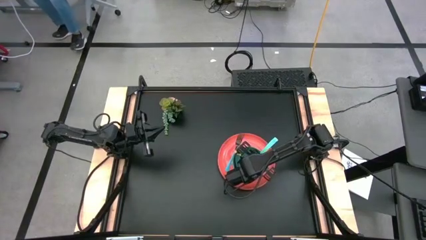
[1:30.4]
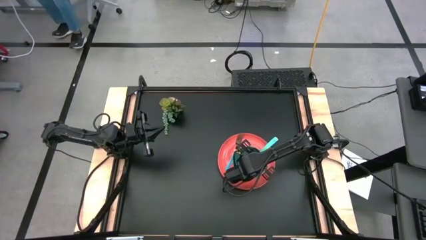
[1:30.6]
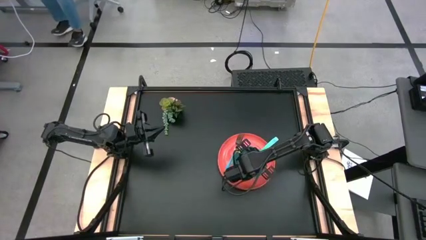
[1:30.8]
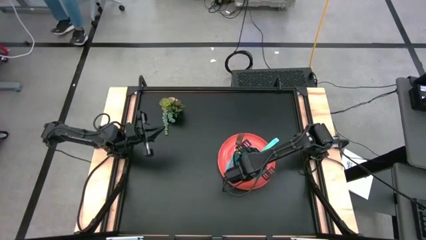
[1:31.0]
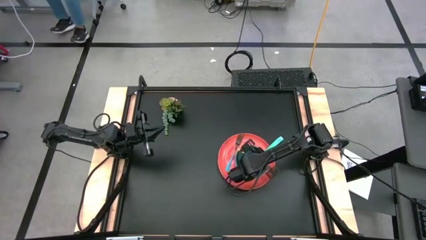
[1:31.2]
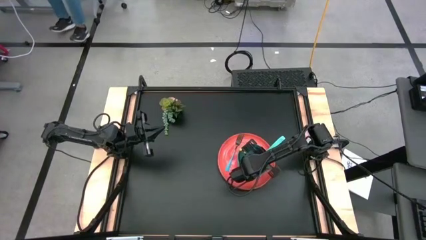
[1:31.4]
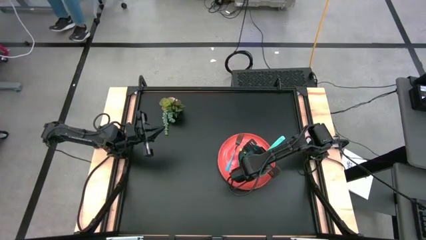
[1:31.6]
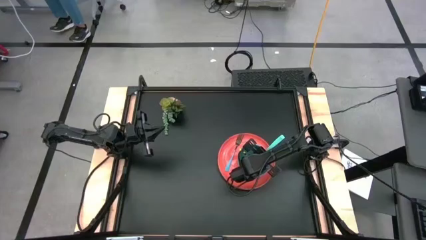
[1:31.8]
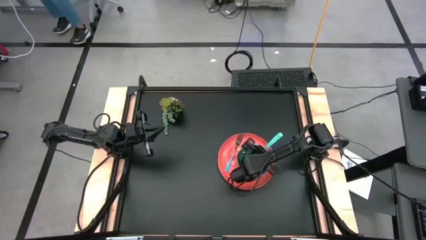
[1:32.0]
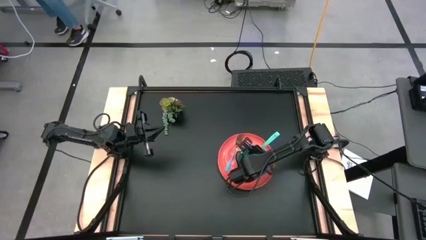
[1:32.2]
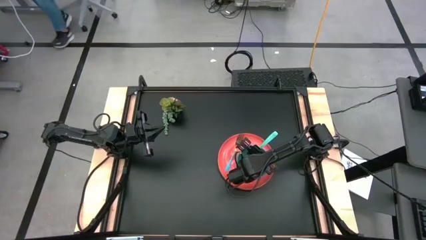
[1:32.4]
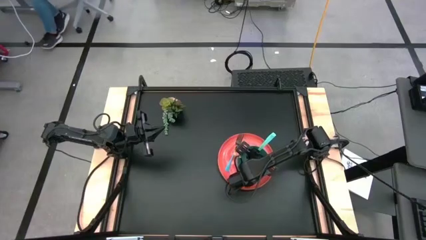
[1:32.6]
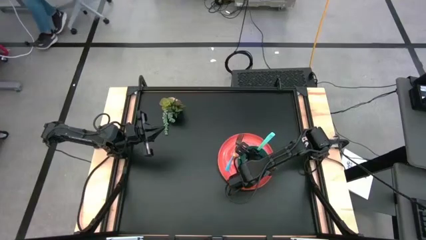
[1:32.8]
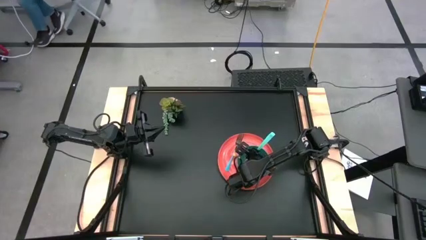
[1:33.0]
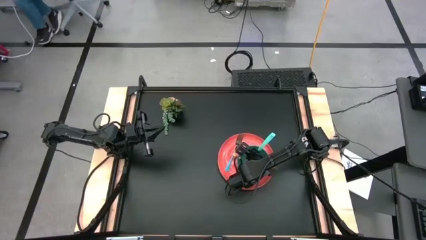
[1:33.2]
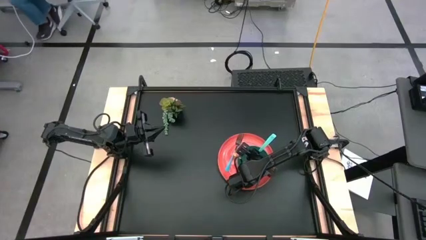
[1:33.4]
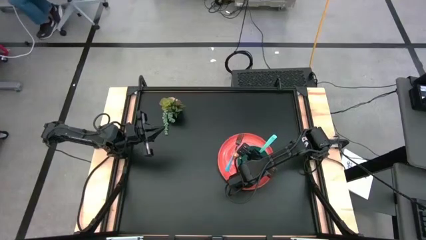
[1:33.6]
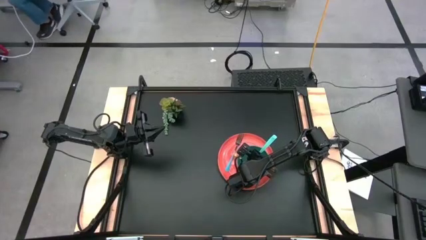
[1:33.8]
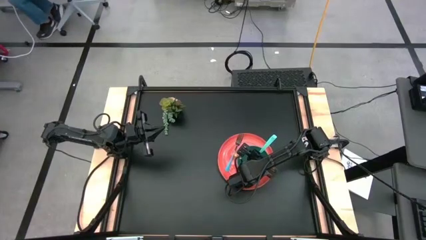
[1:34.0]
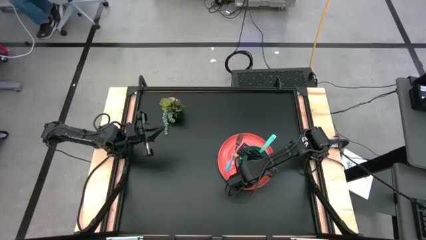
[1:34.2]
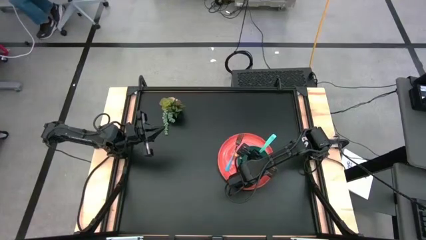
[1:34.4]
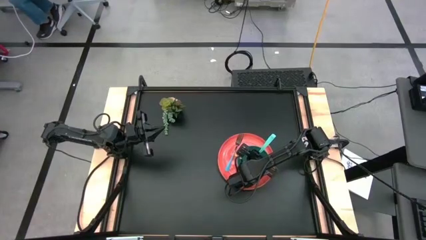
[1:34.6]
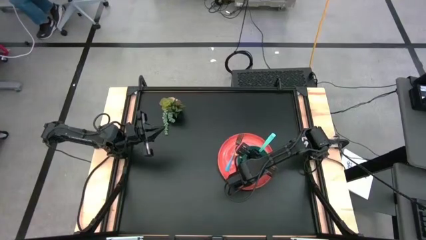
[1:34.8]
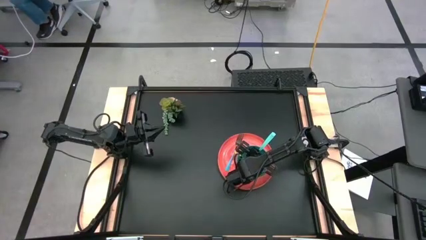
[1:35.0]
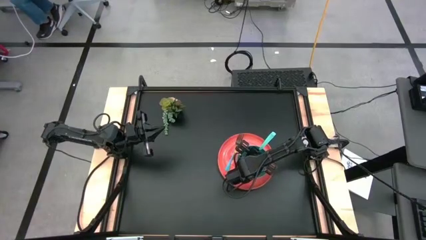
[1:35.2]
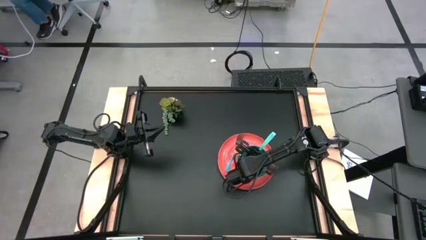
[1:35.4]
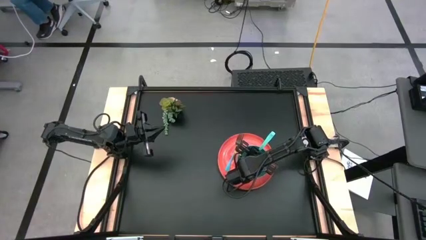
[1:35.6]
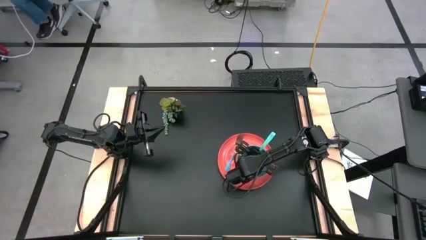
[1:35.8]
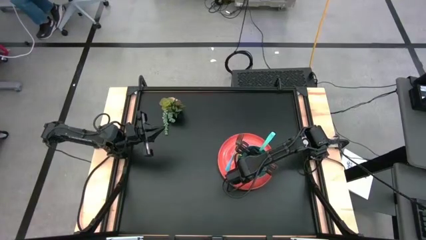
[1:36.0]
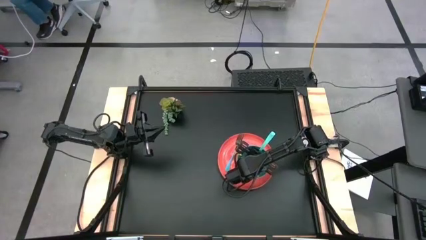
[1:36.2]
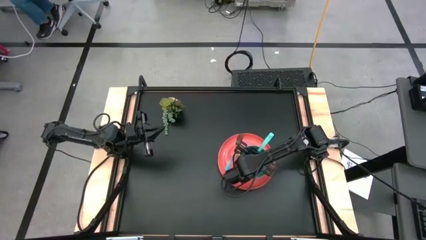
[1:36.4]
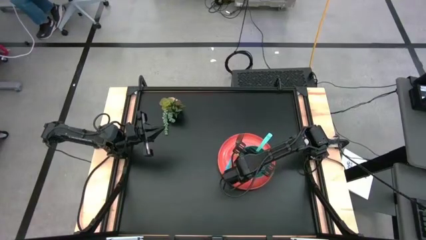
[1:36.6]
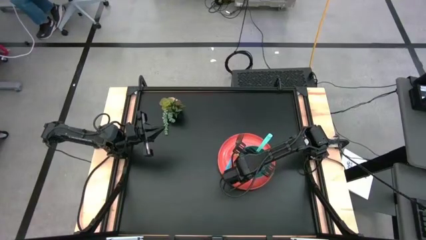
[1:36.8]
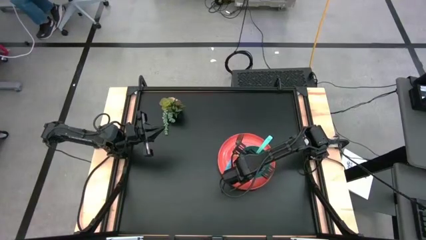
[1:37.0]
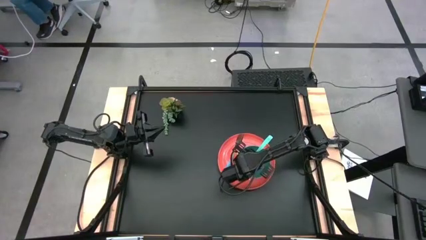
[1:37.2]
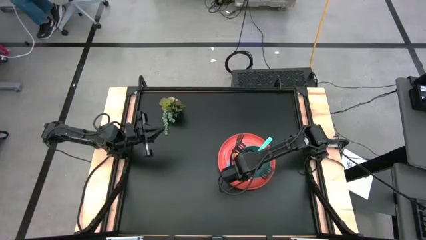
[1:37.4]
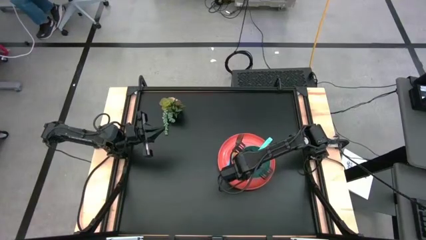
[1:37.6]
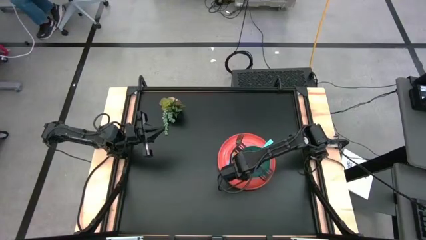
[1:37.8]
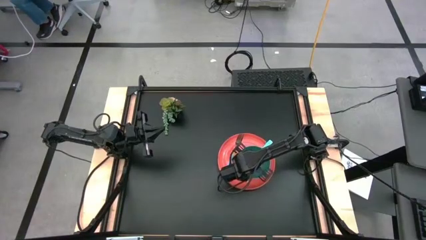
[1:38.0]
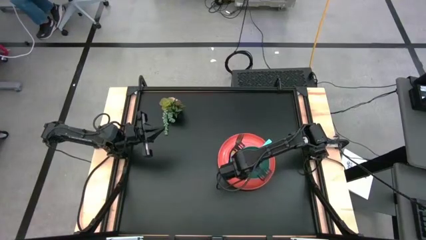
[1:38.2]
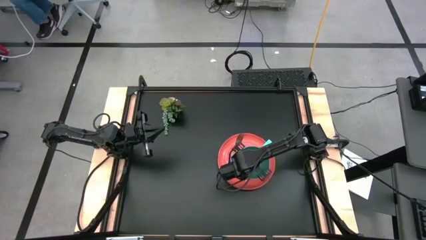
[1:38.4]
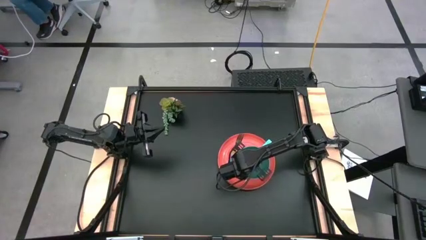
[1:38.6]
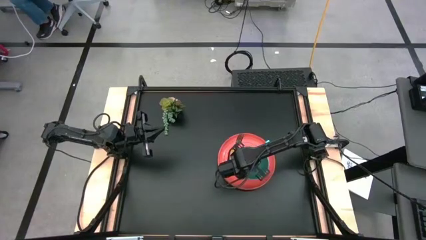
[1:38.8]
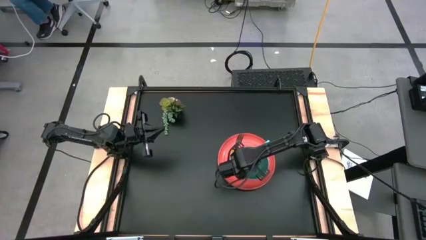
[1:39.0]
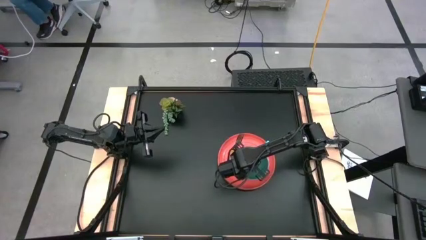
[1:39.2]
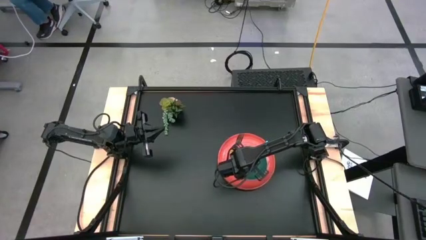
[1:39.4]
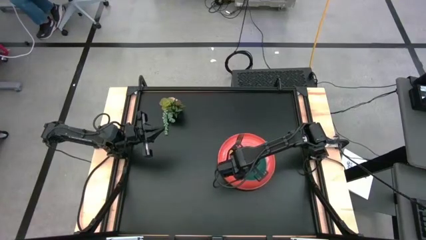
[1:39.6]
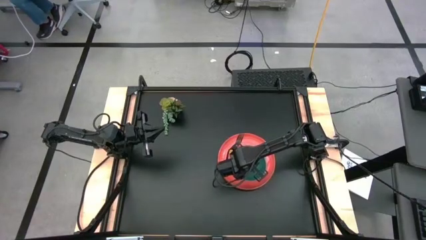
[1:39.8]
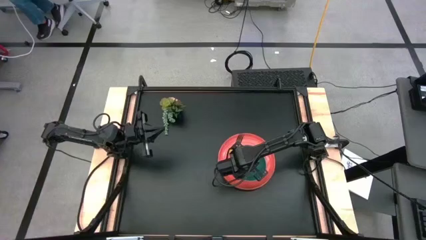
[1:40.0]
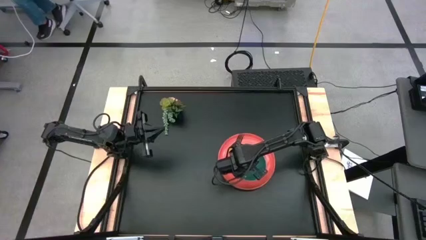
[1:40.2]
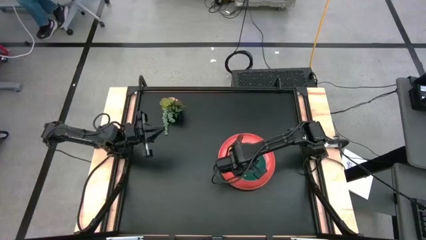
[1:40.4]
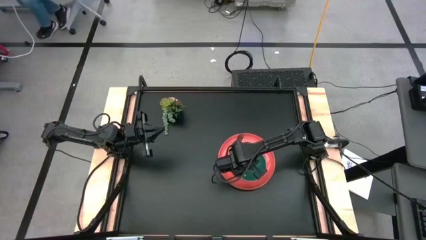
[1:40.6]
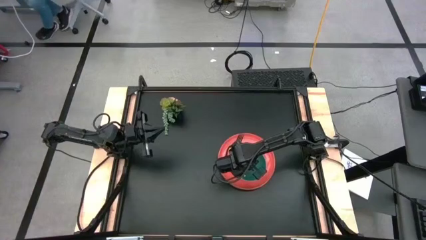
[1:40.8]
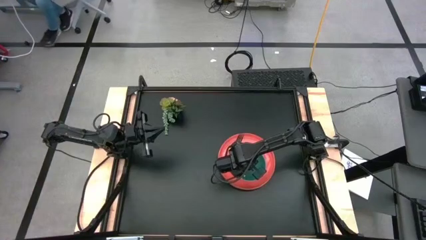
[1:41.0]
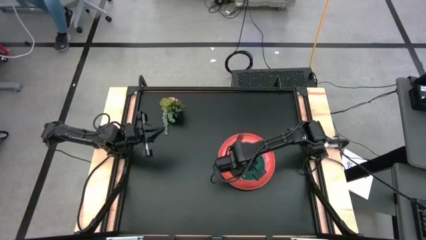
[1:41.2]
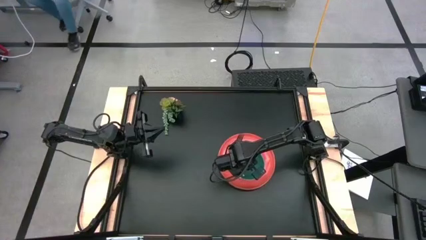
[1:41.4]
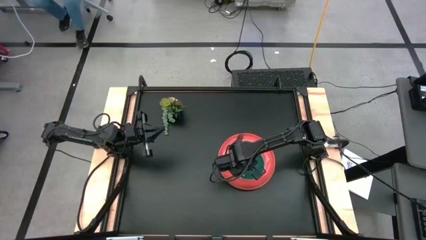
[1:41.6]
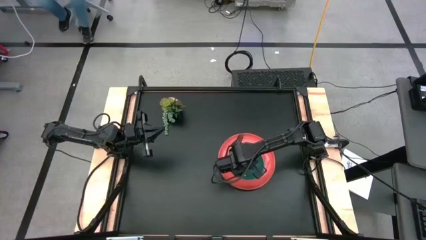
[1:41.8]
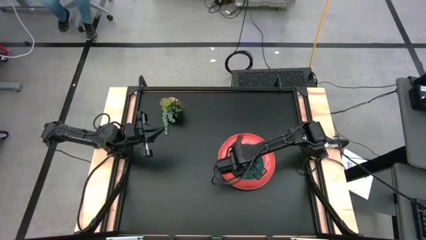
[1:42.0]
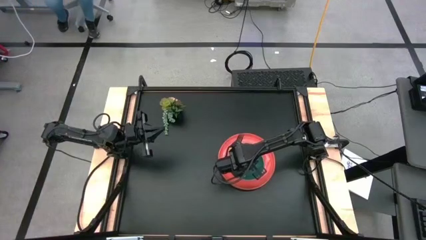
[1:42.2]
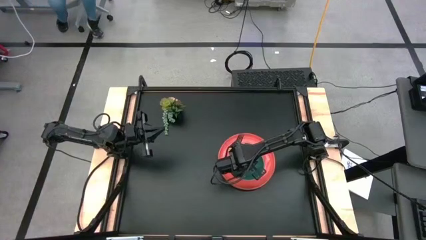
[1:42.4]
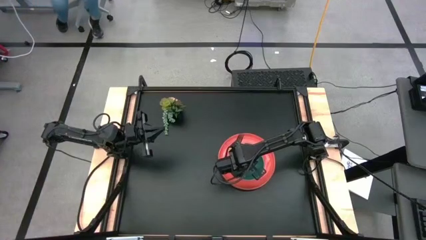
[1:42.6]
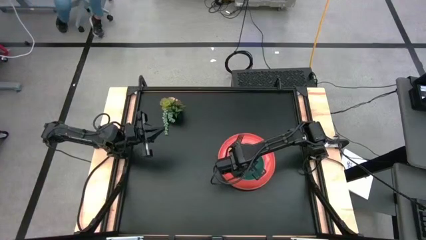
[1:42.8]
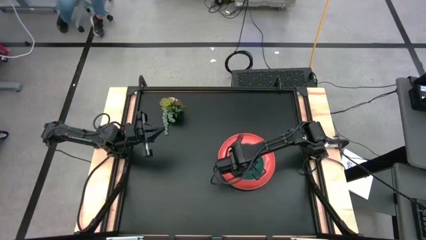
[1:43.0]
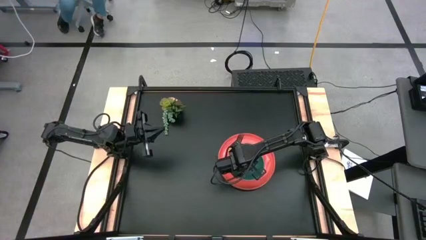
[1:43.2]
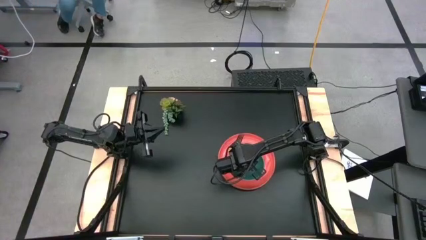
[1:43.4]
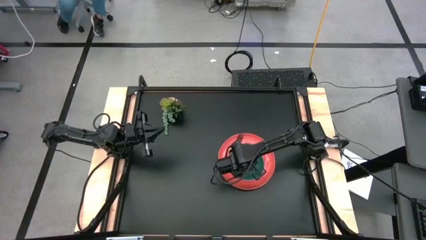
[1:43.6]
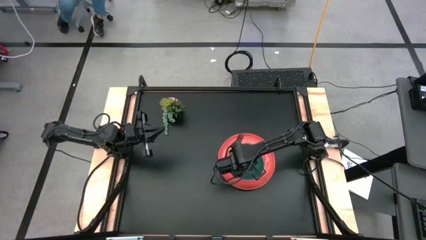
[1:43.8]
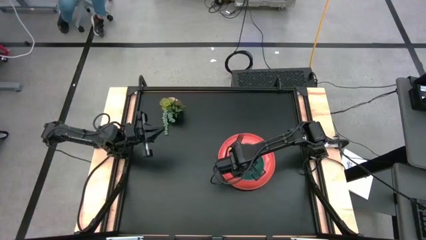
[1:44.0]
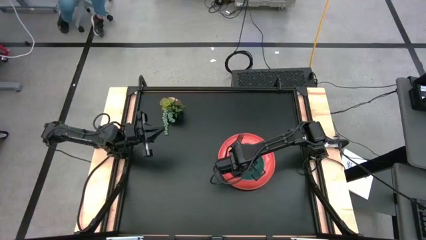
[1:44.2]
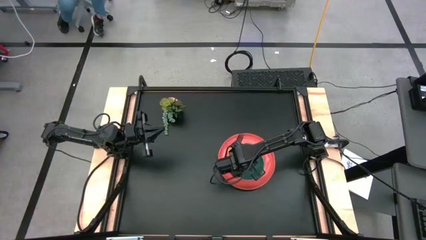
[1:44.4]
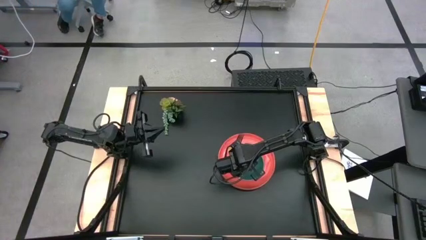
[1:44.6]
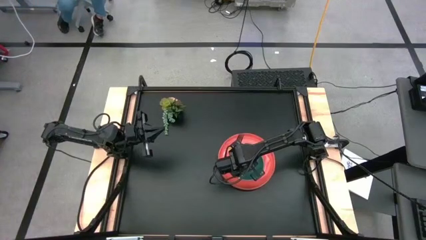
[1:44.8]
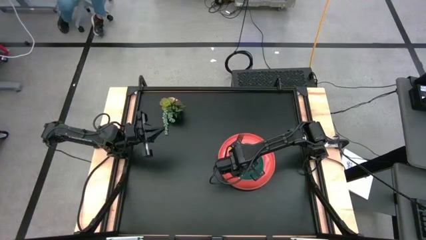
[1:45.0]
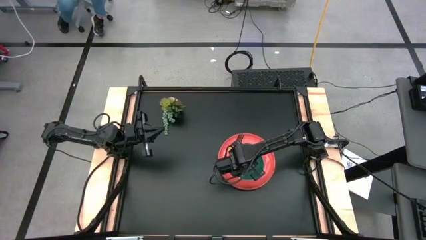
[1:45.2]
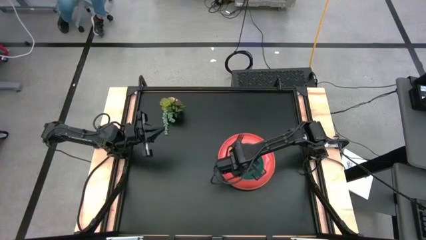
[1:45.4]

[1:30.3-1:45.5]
Task: Set table place
Put the blue spoon into the green bowl
